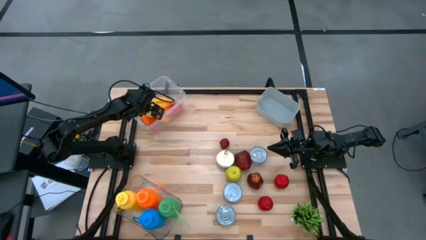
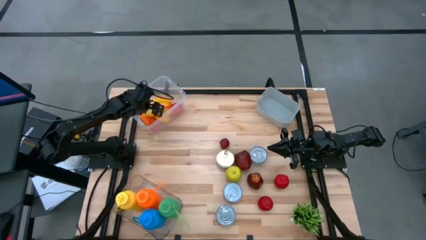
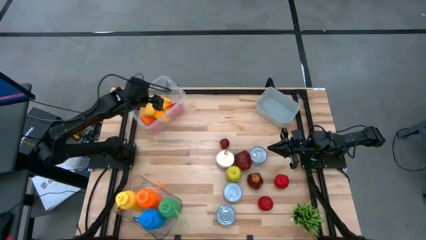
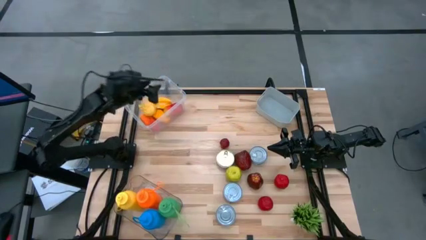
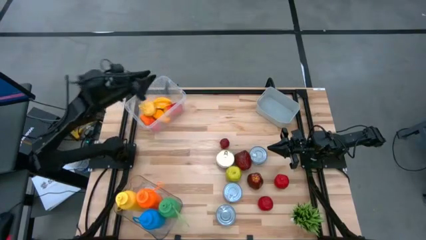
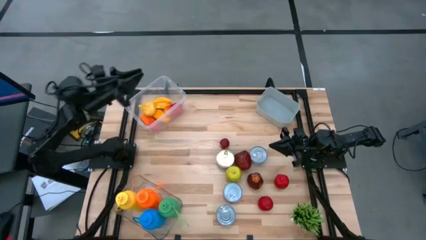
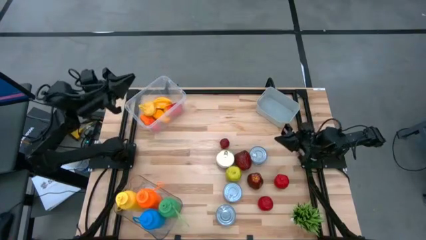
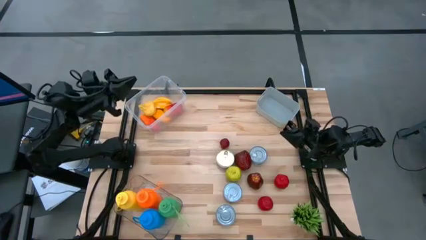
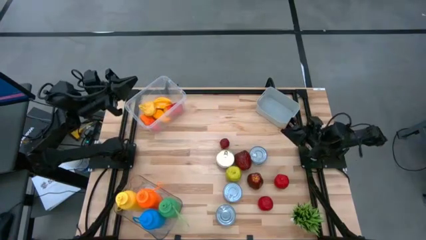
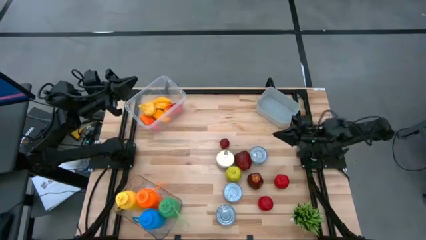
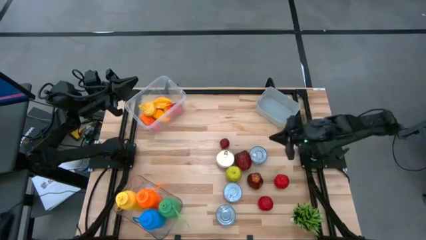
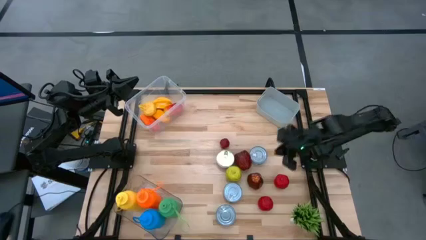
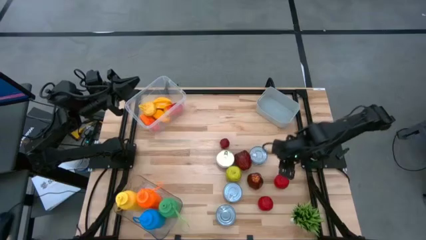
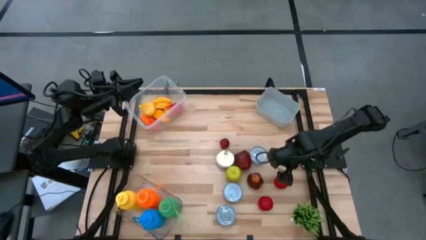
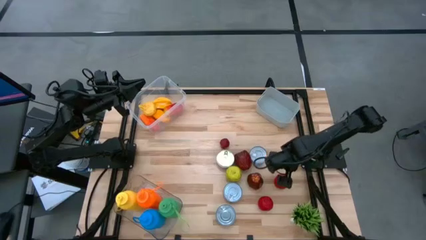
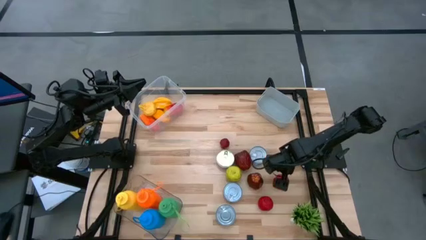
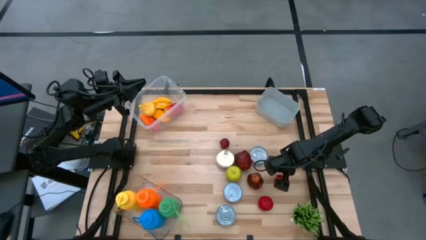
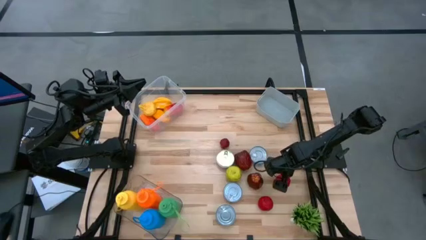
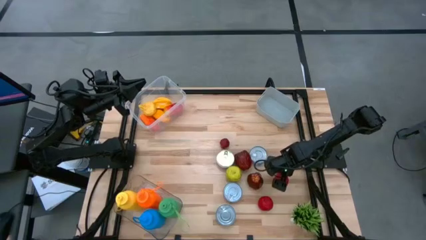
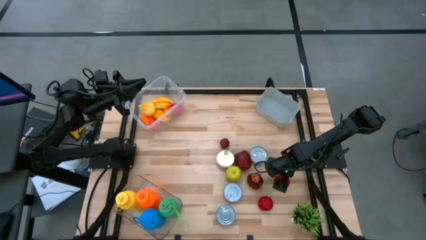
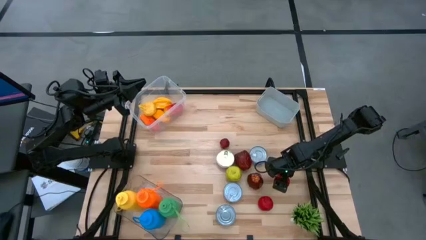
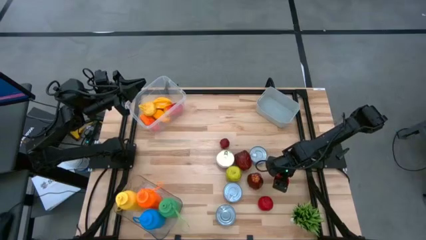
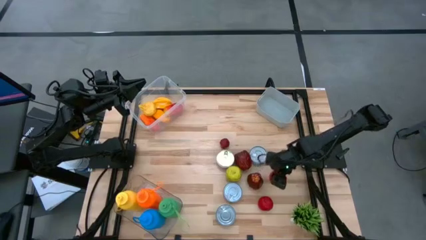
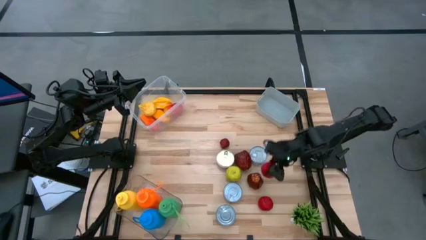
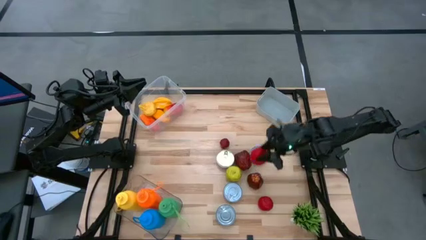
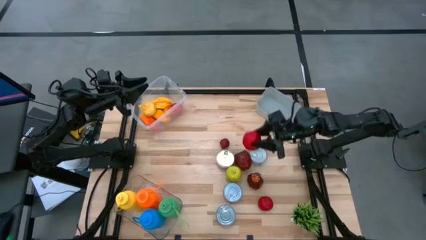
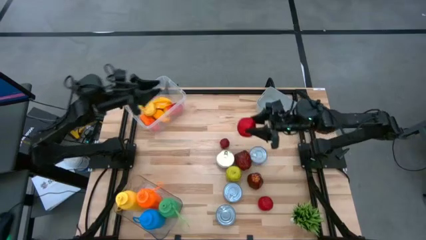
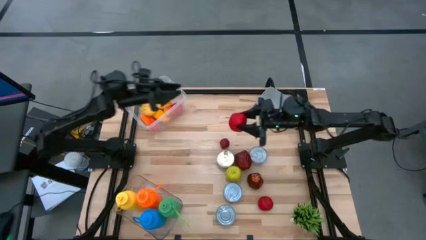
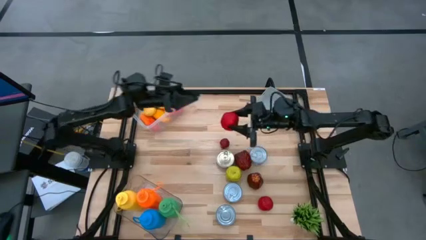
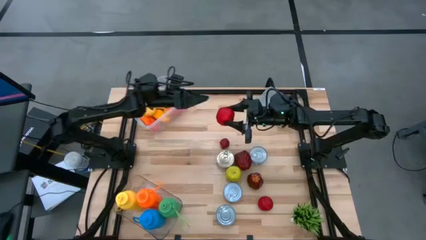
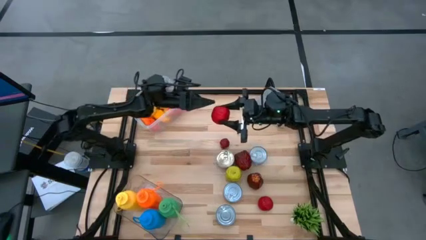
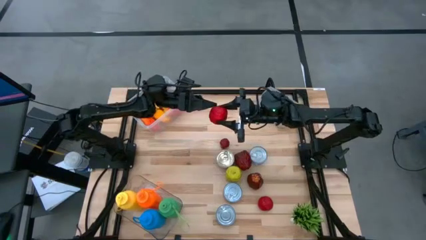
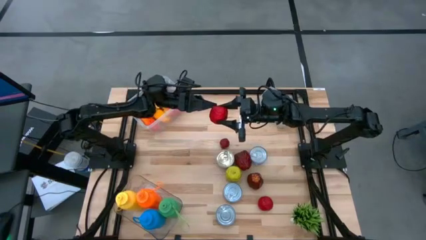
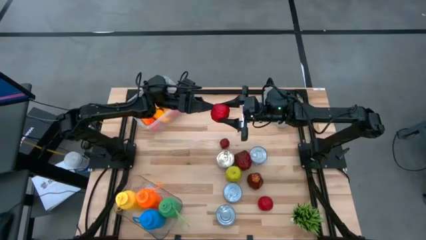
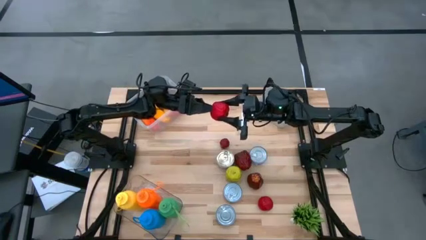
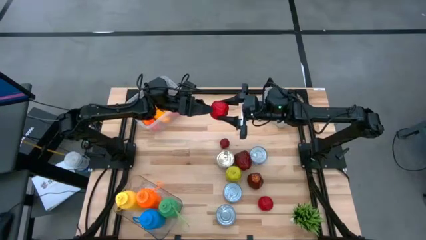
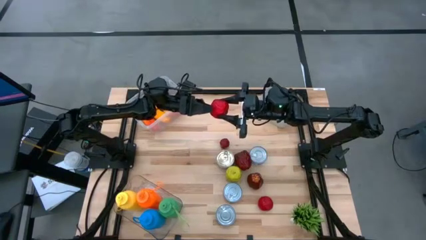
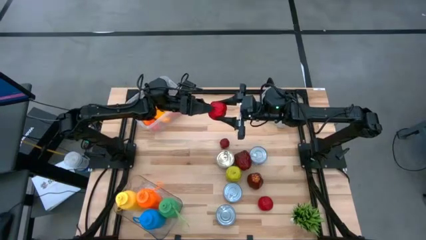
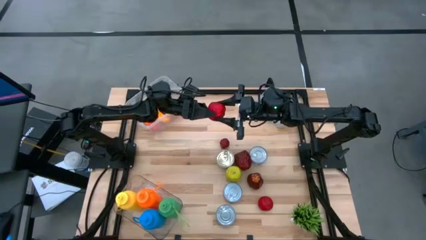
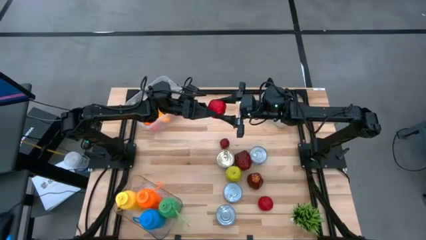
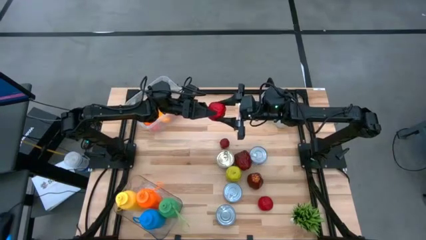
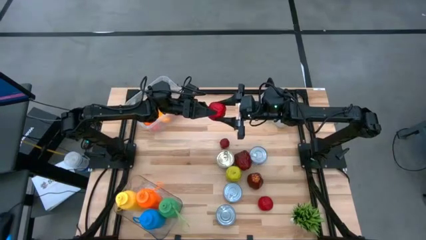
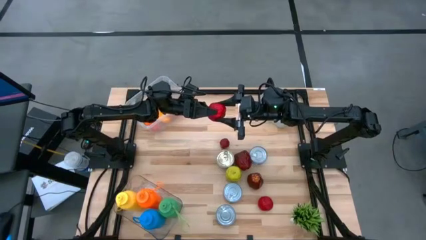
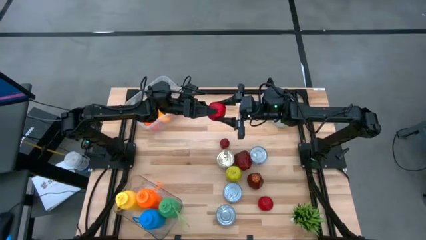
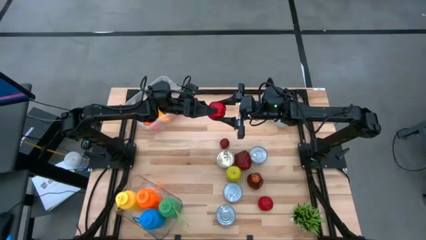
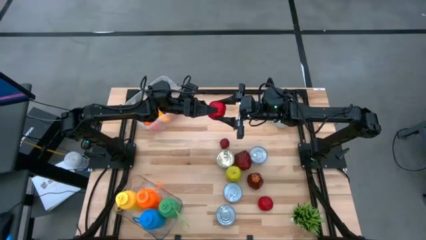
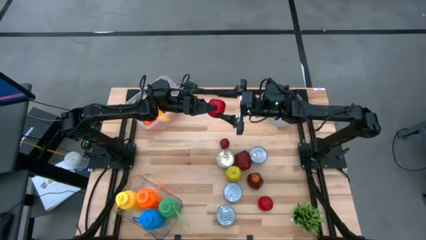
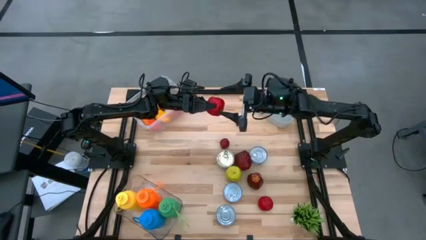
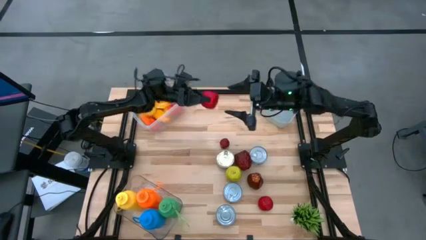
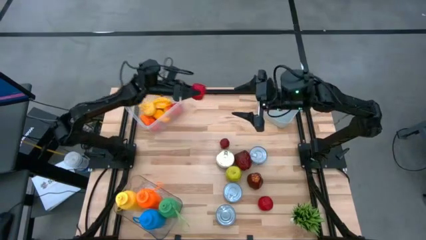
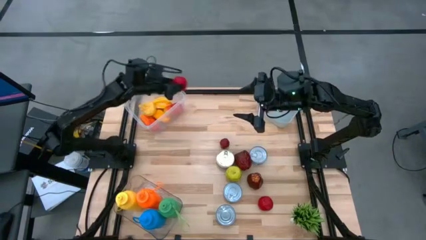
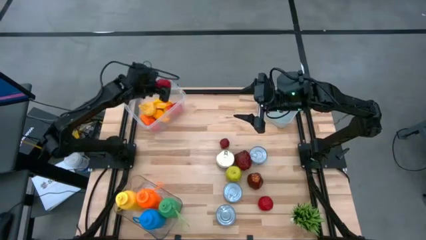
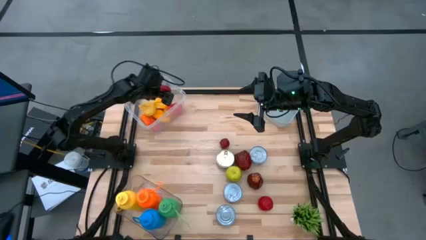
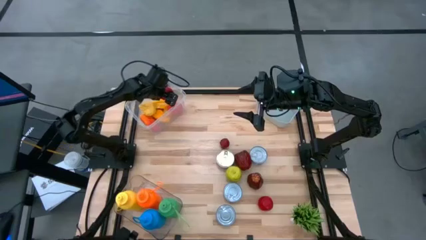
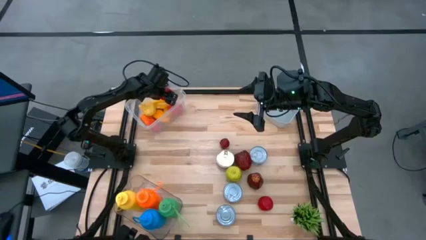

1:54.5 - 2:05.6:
Task: Pick & Place Food Item
Put the top red tomato into the white bin

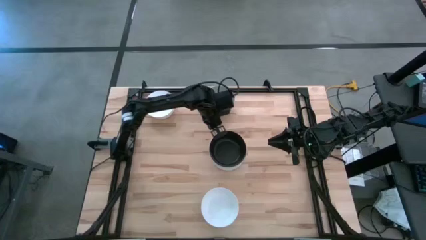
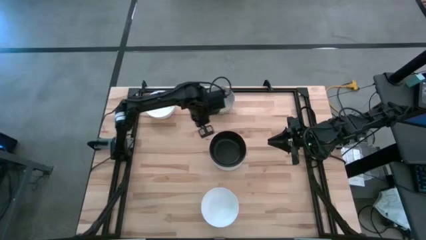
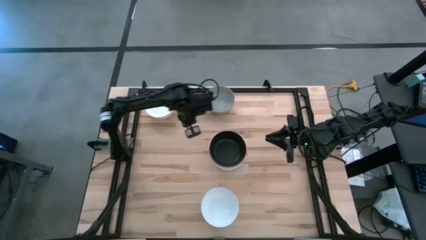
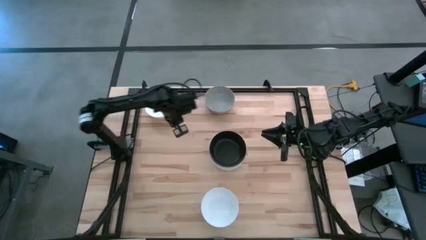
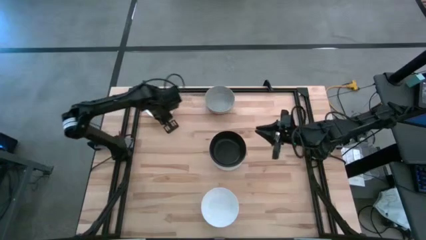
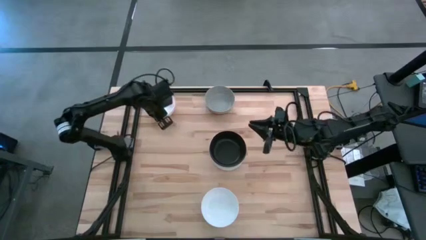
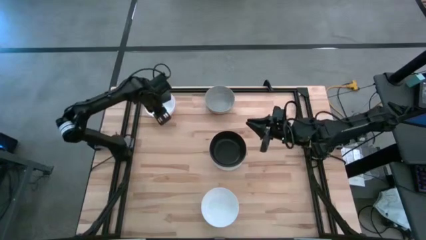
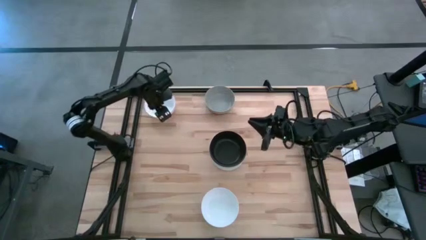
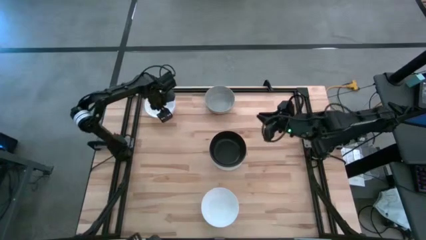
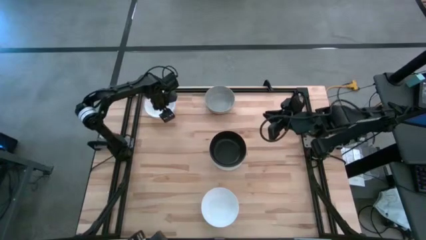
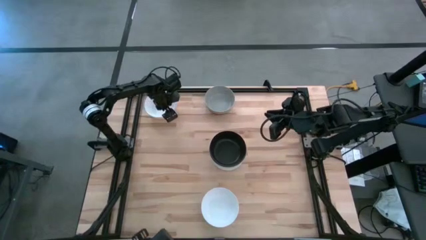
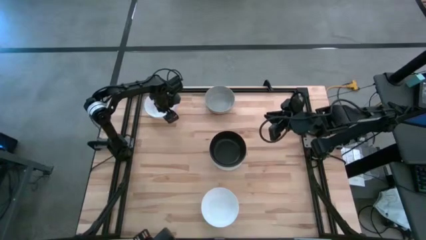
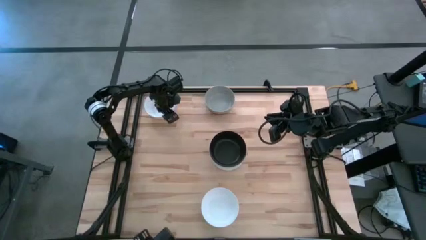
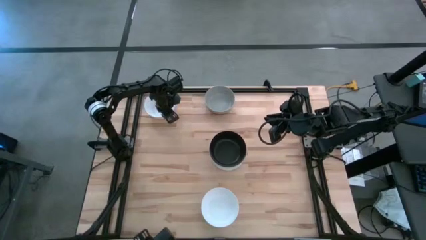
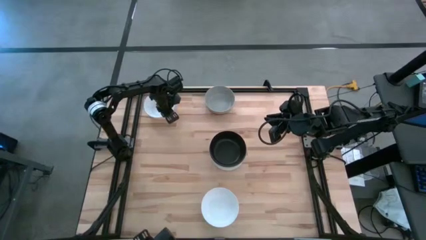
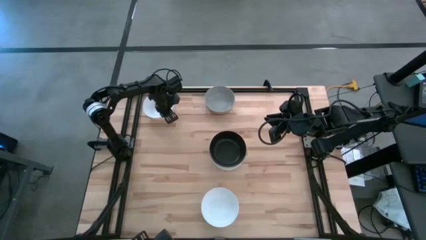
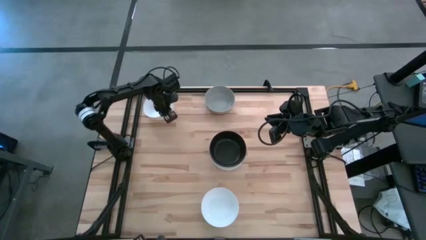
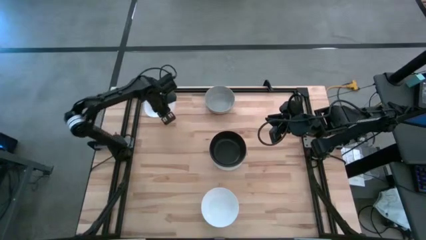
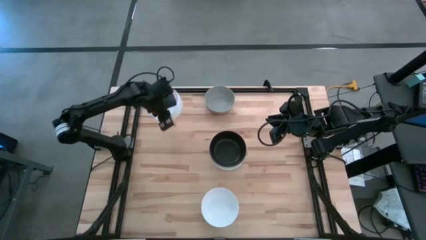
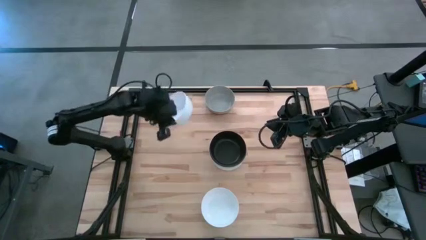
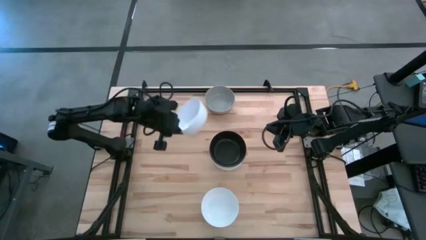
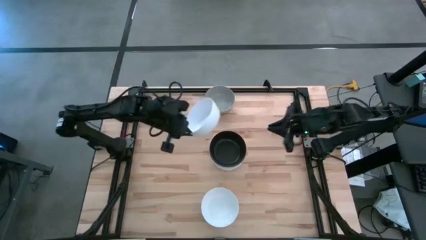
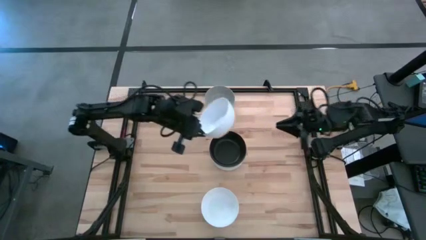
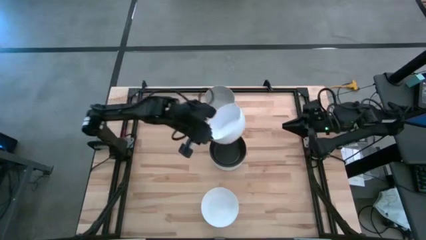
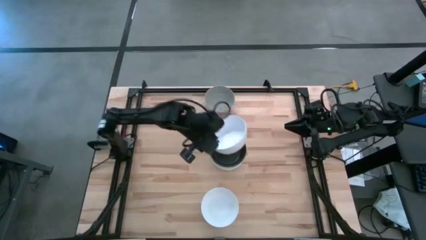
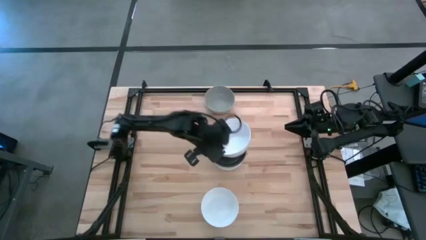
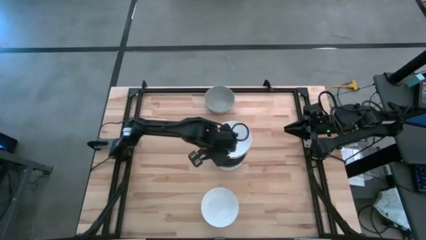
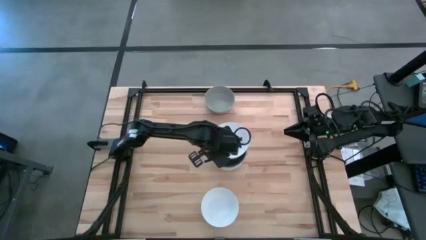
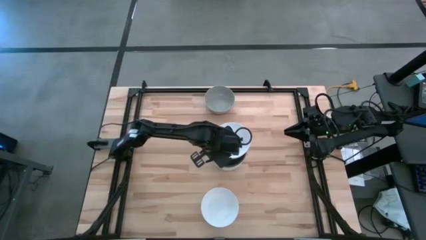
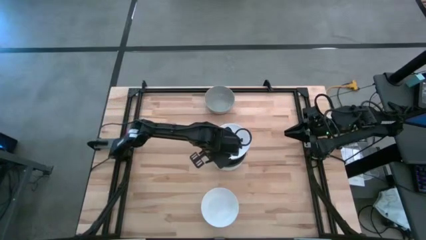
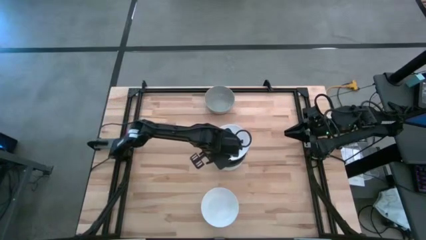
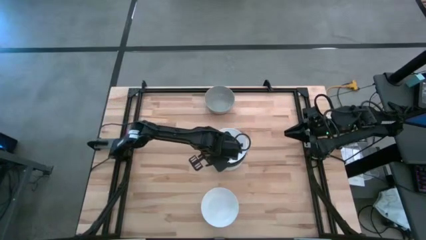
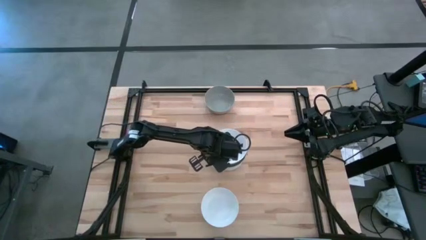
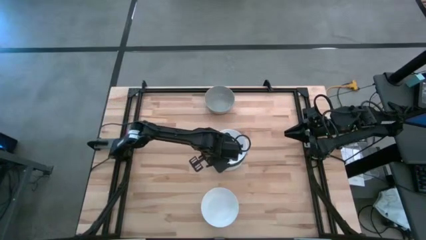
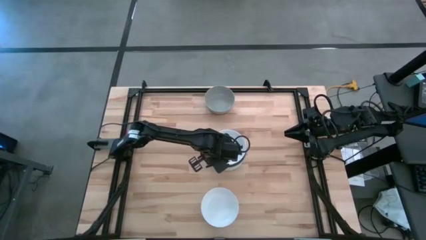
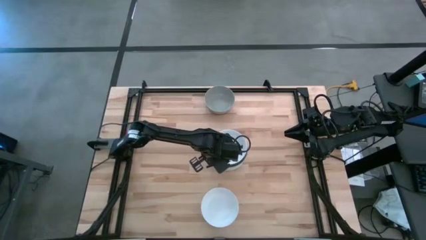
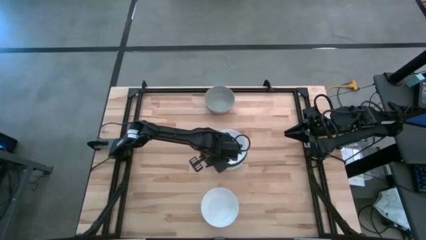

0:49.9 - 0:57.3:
Task: Nest bowls inside each other
Stack the top white bowl on the black bowl
